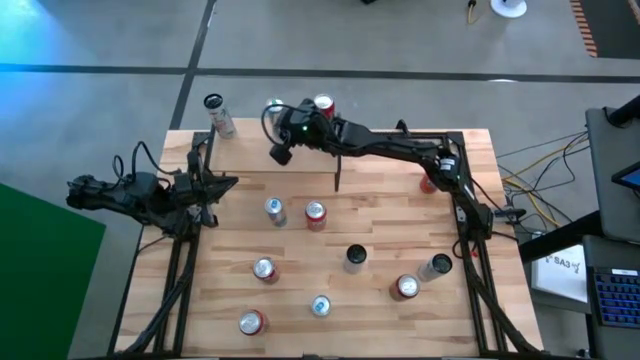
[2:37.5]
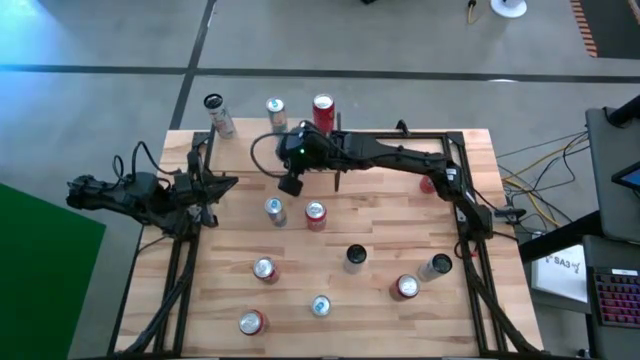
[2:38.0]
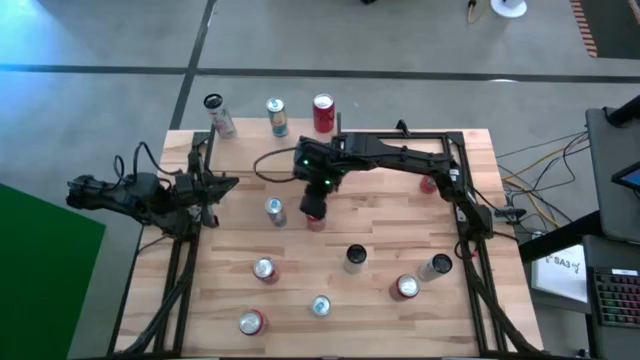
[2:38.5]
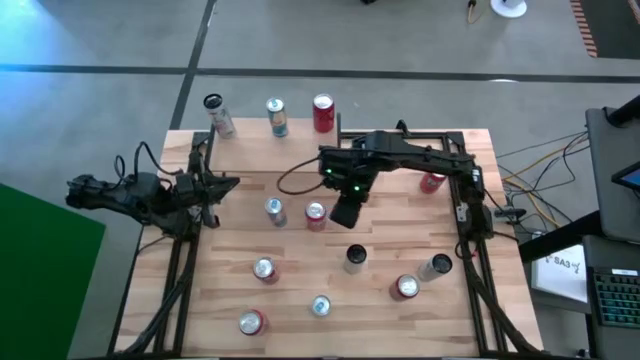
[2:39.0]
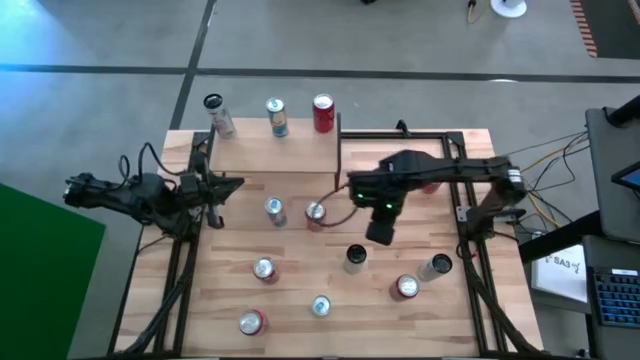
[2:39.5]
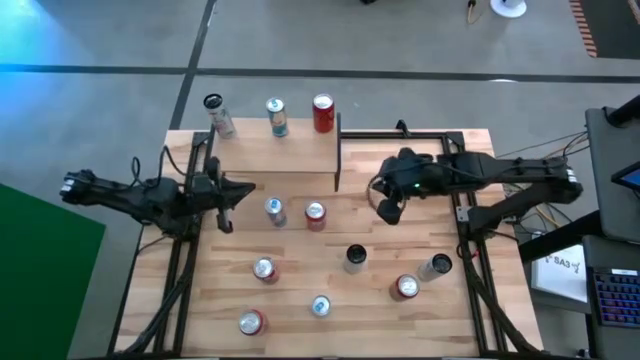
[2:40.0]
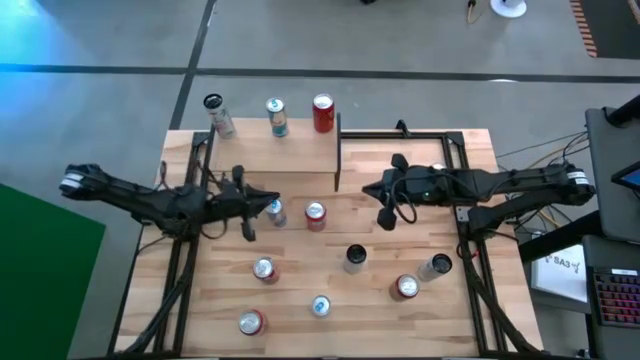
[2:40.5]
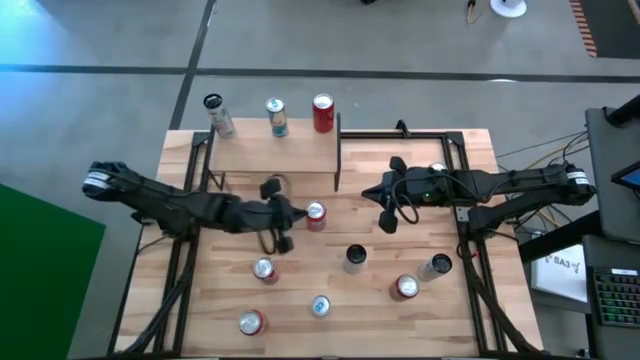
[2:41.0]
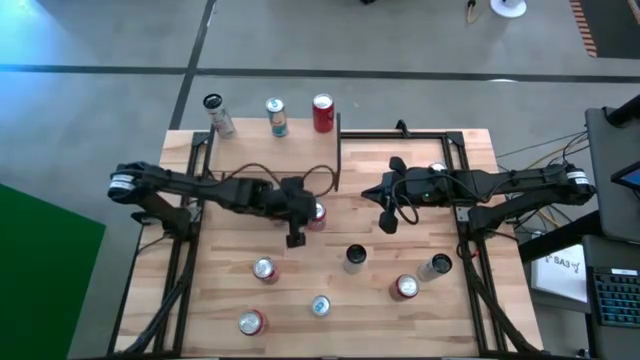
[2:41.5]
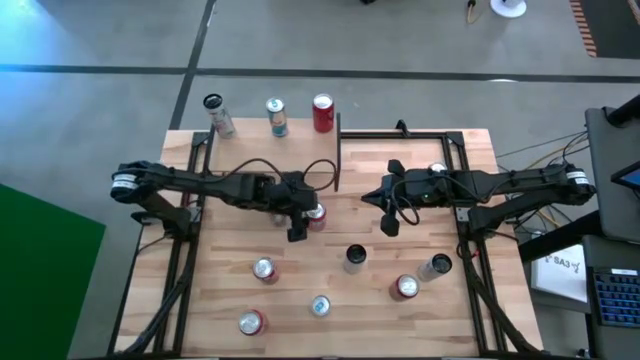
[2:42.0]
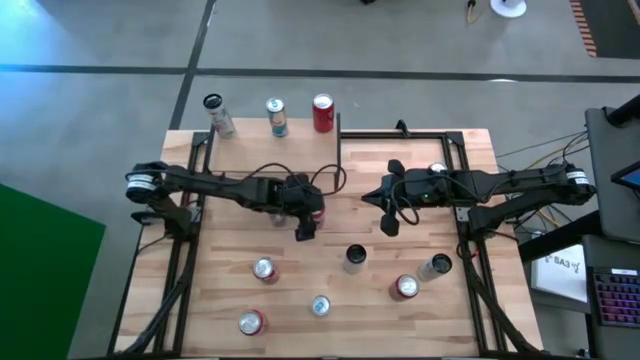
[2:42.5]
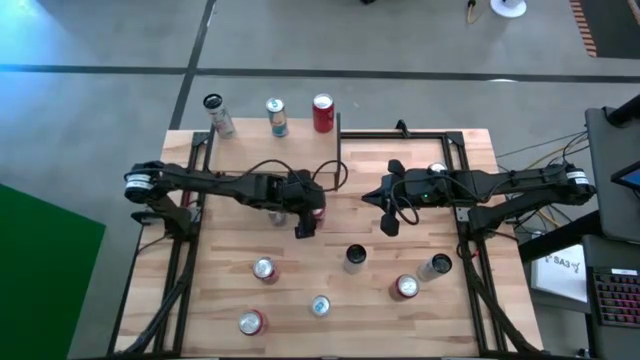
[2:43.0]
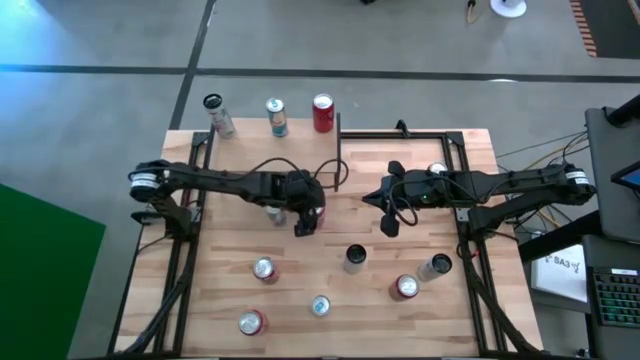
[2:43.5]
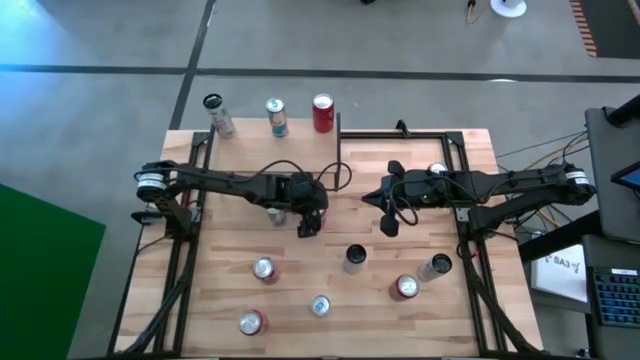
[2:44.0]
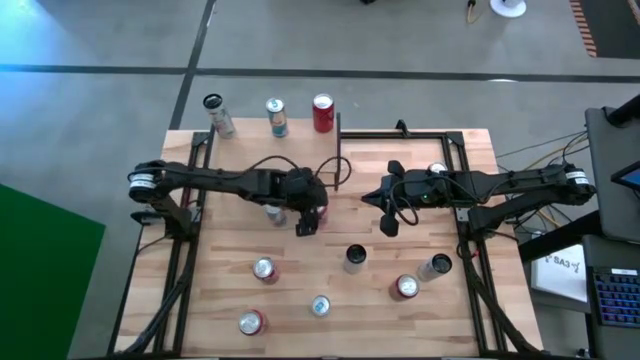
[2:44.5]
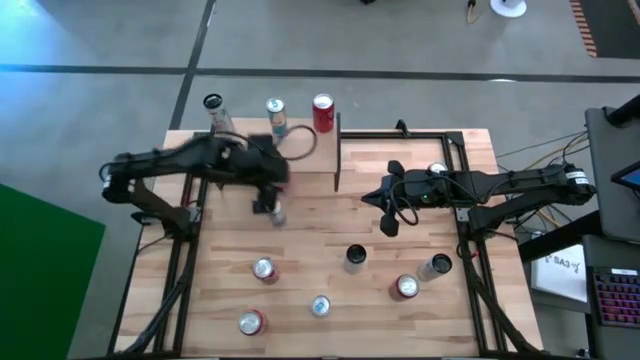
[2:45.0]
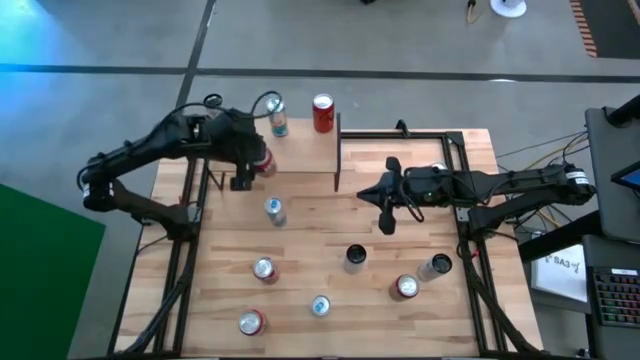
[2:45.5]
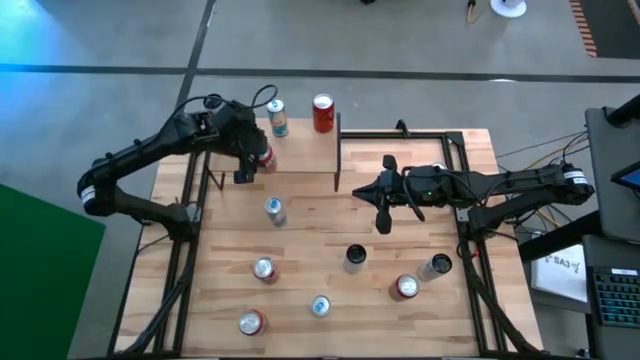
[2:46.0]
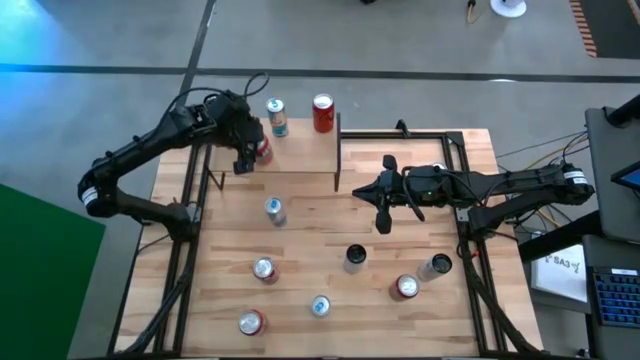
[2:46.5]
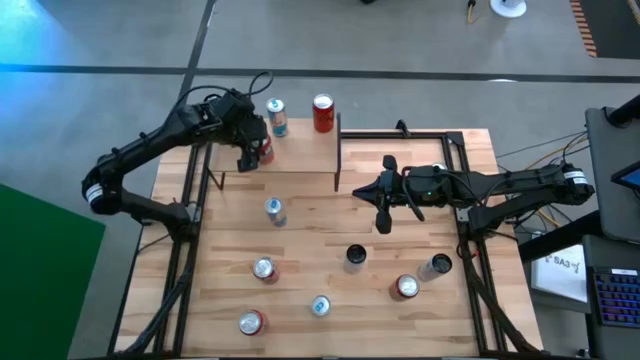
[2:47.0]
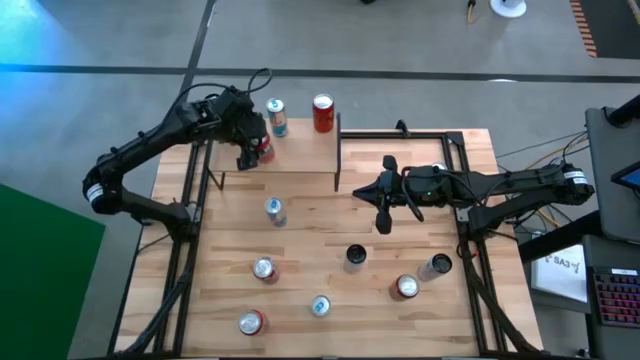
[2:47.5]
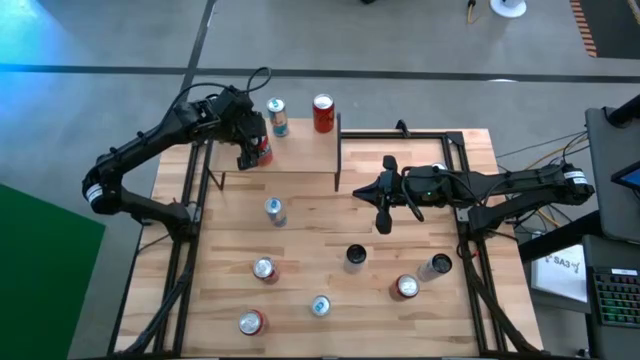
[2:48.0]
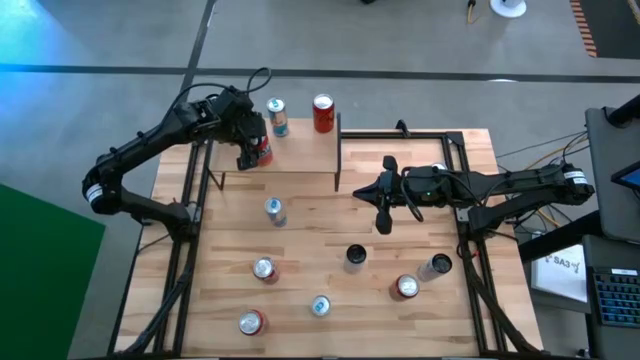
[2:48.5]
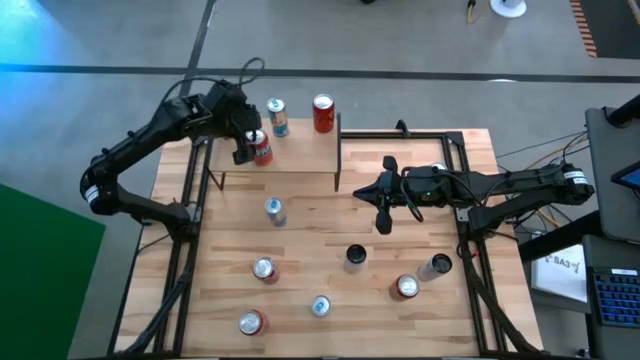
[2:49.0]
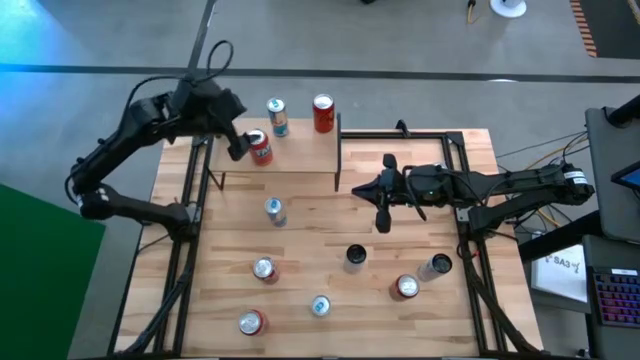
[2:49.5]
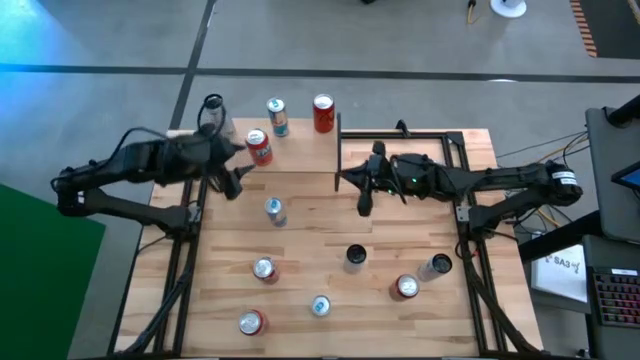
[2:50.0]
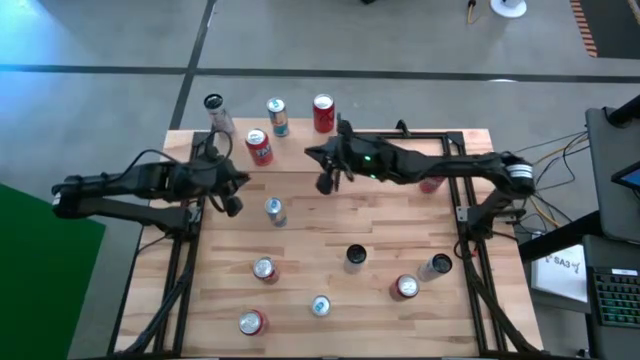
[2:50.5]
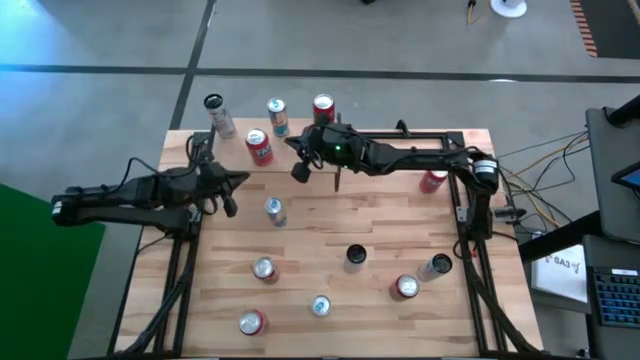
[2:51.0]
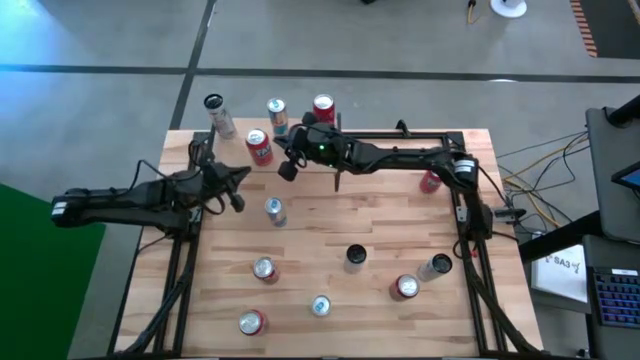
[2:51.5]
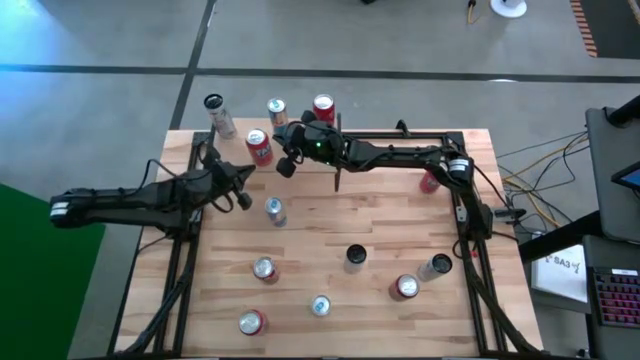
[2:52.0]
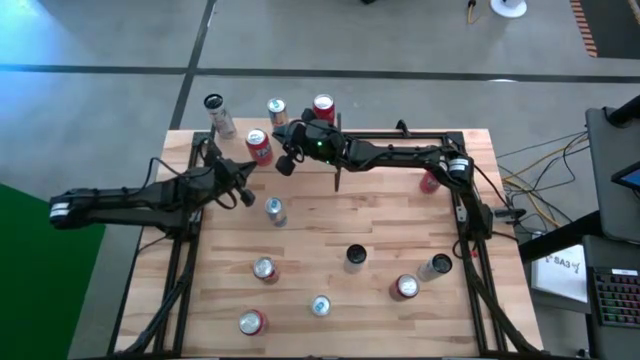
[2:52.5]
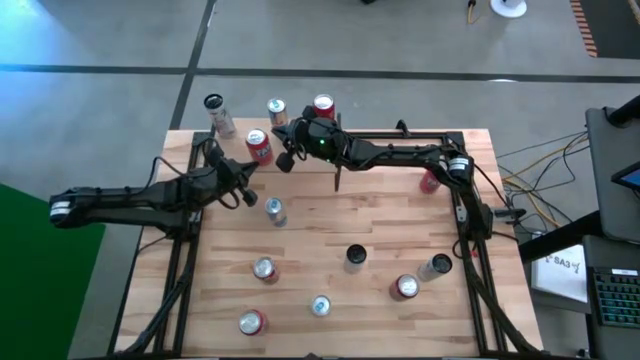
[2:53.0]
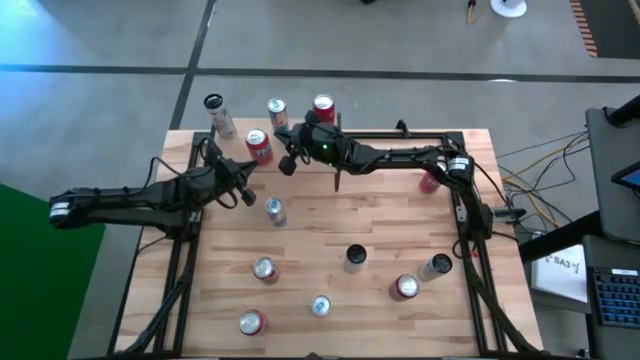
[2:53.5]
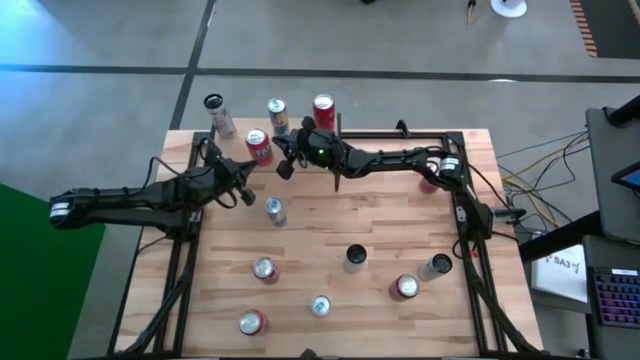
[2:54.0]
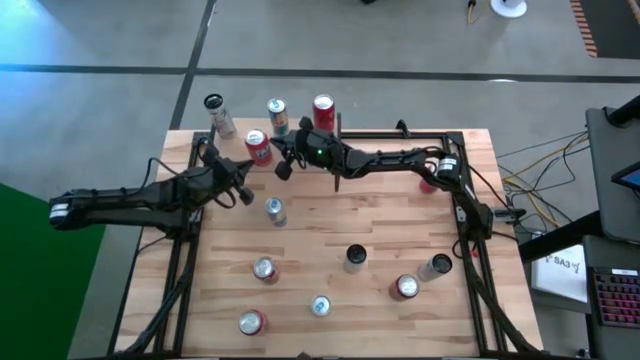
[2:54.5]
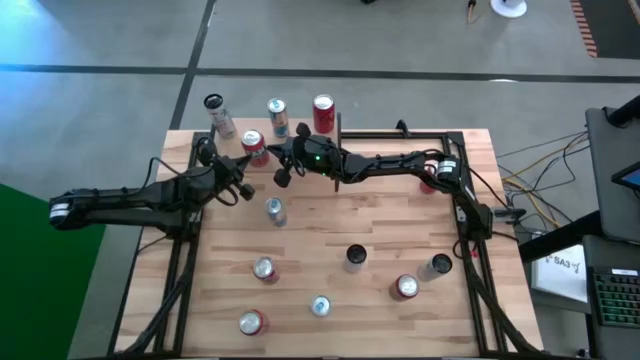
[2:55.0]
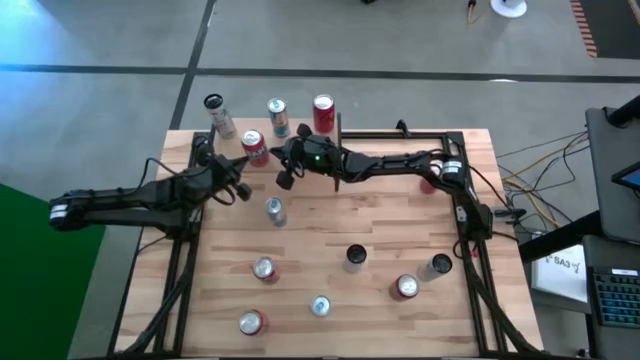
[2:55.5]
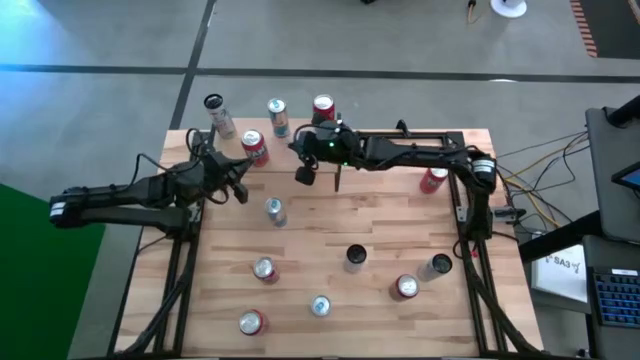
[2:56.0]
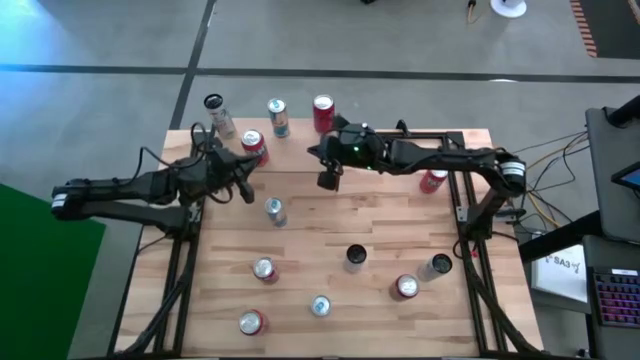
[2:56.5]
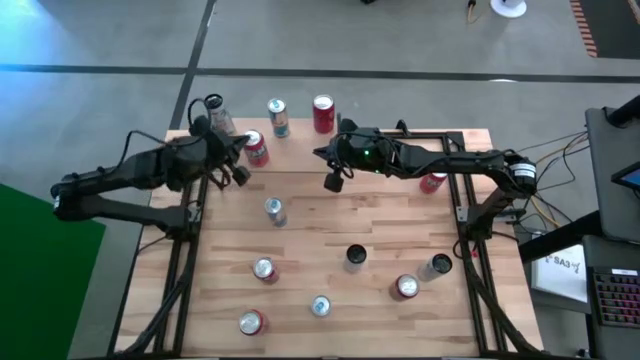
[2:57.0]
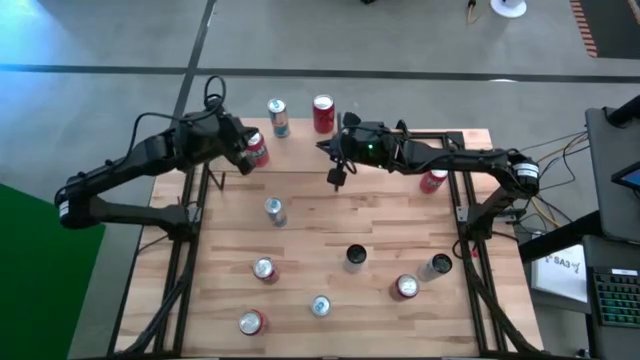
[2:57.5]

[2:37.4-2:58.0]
Task: Place canned beverage on shelf
Put the red soda can on the shelf

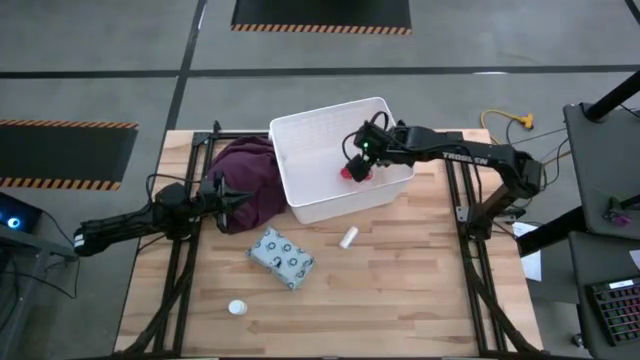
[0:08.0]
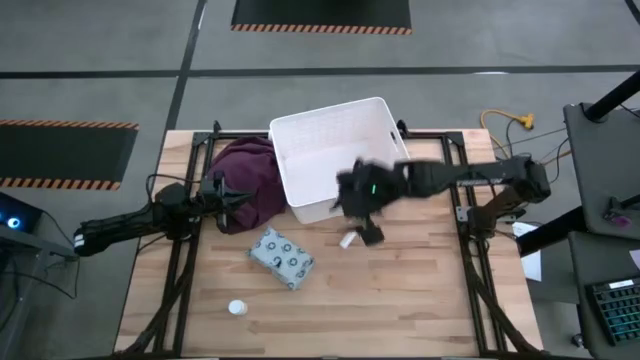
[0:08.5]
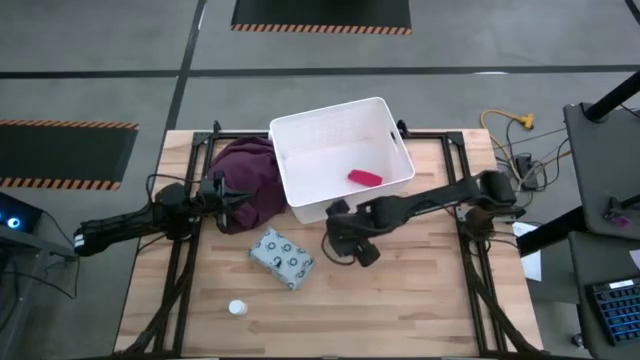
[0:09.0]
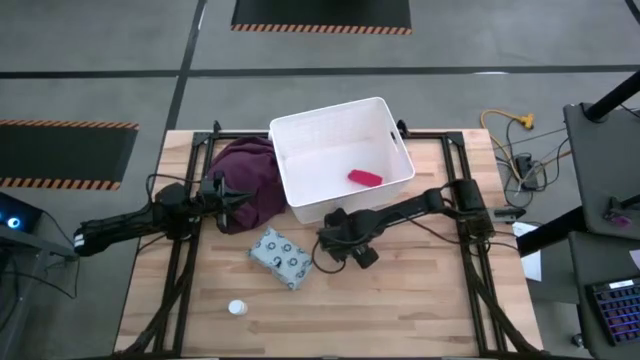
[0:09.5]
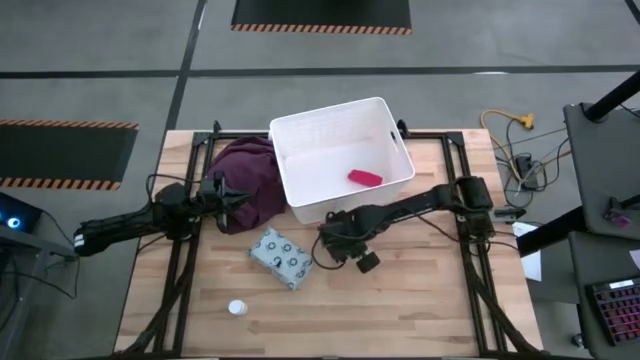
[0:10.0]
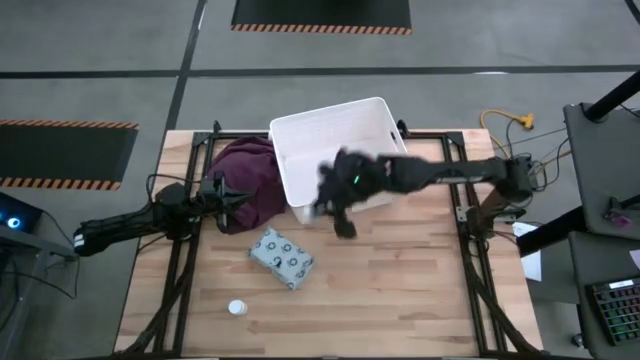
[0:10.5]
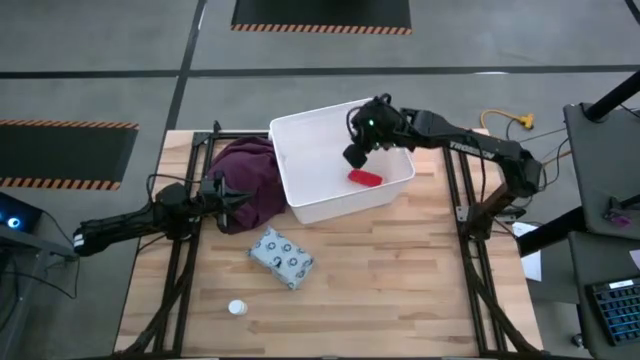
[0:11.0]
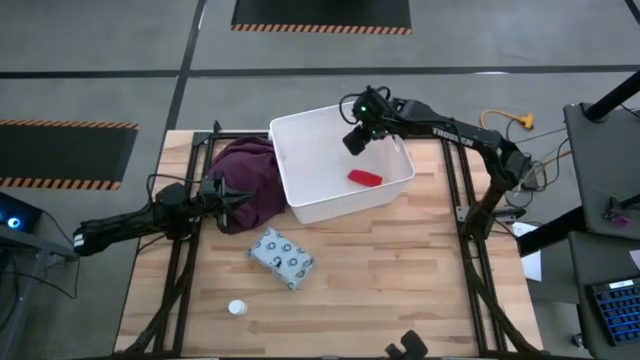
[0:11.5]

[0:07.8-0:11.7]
Task: Pick & place medical supplies in basket/bin
Put the rolled gauze into the white bin
